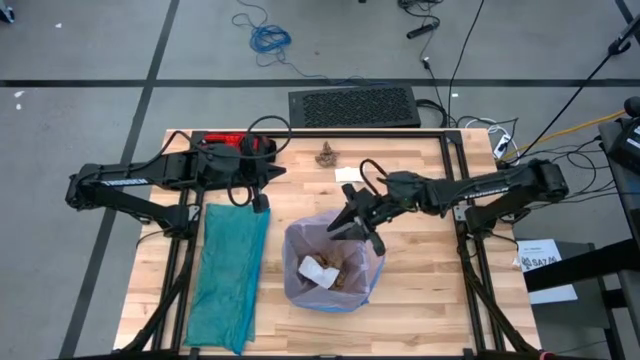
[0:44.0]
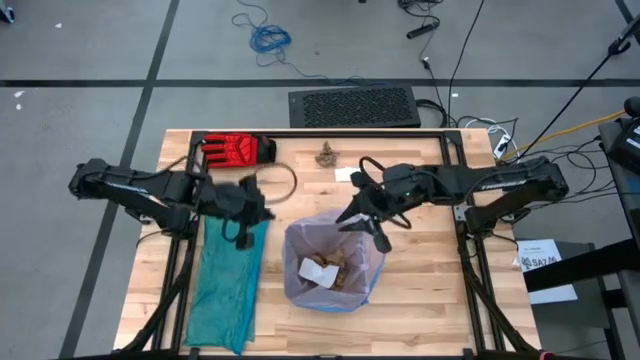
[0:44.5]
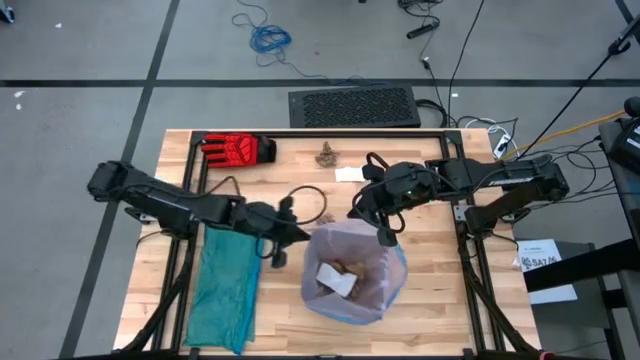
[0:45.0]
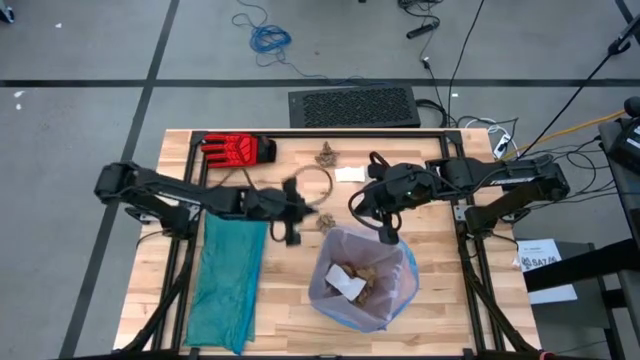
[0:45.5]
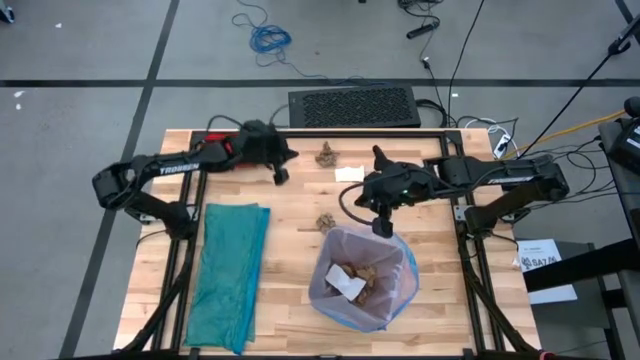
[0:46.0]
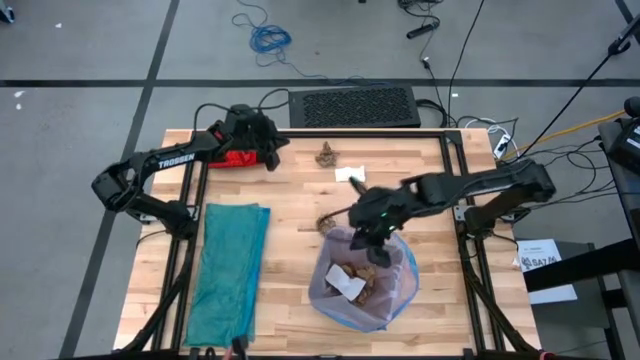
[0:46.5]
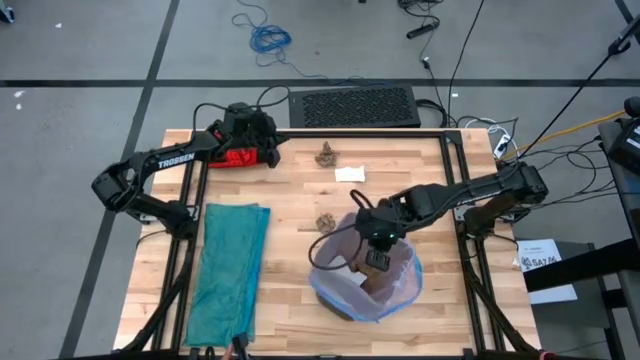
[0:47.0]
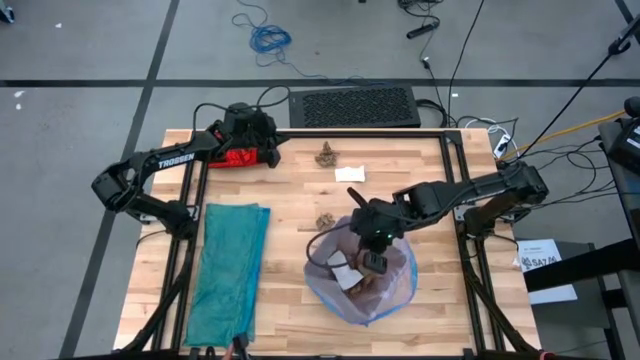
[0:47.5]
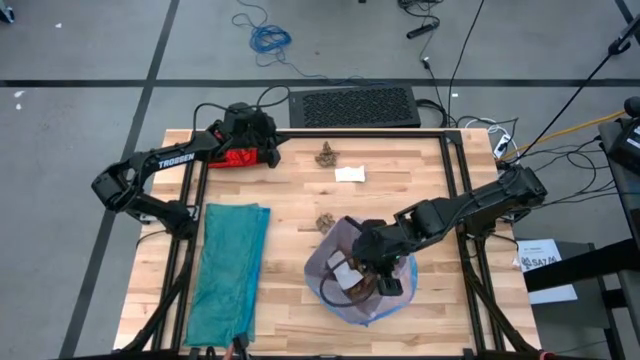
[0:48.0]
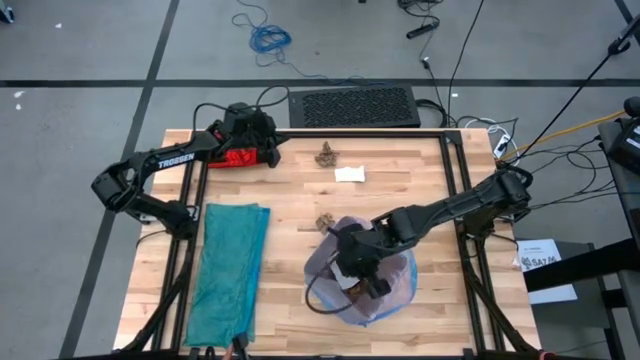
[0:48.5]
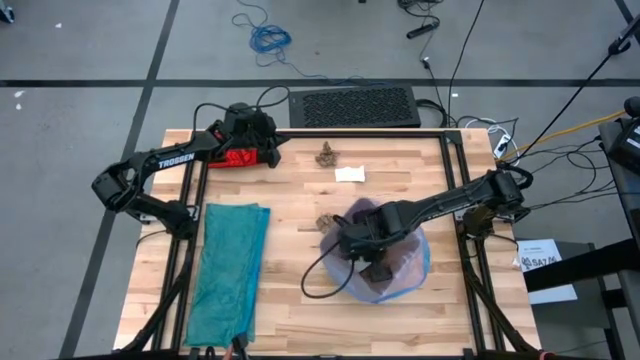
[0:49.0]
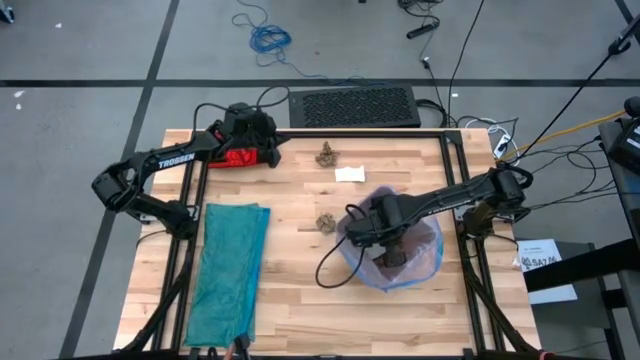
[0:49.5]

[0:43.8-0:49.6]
Task: place trash/remove bag and relplace
Adjust the black trash bin on the table

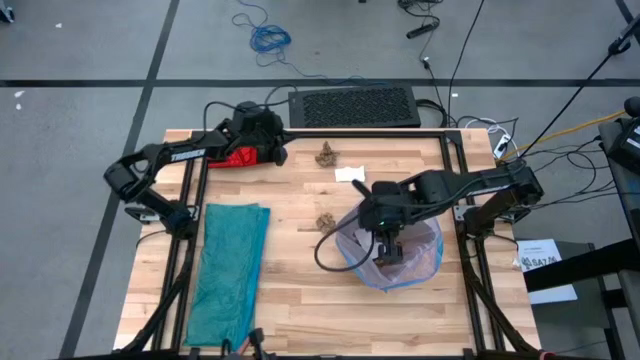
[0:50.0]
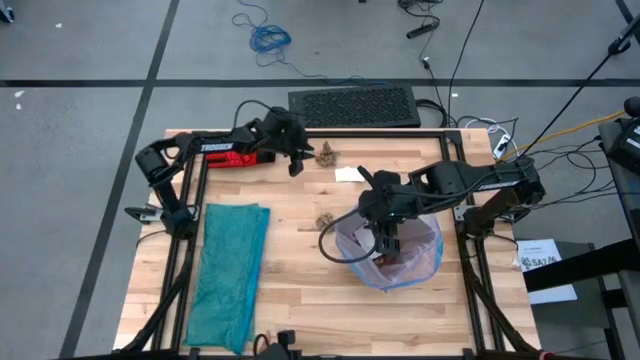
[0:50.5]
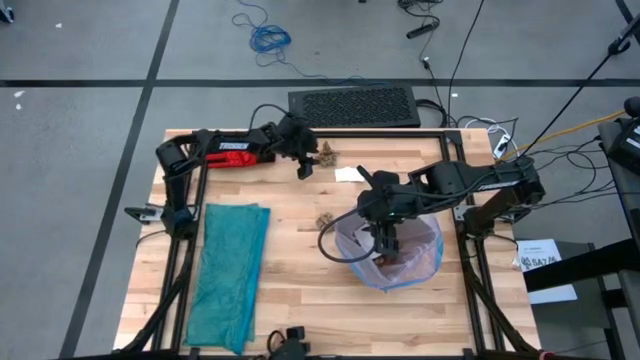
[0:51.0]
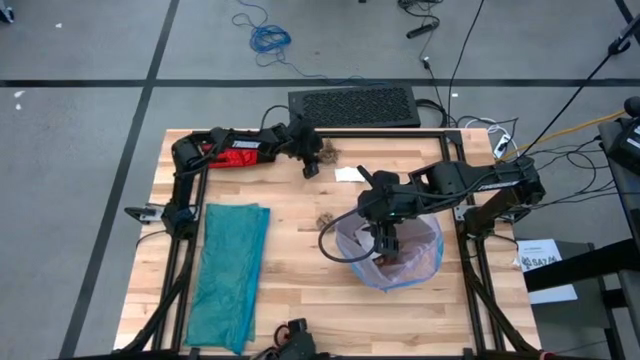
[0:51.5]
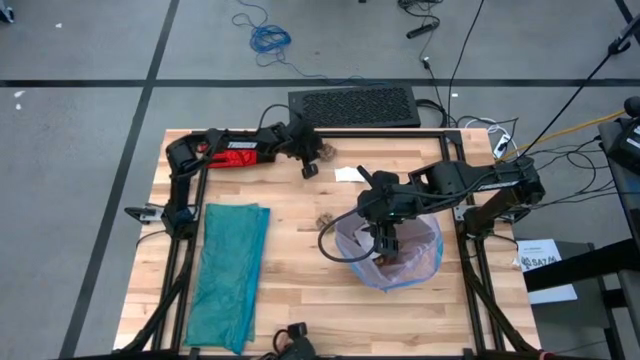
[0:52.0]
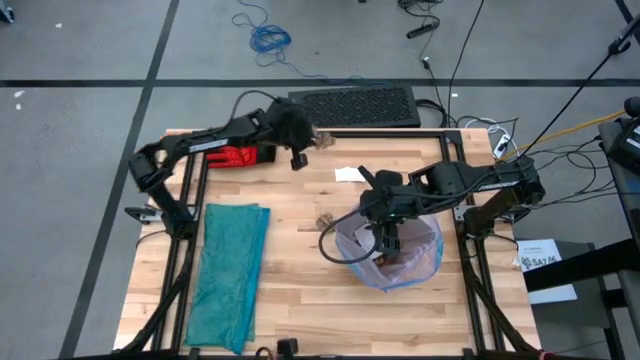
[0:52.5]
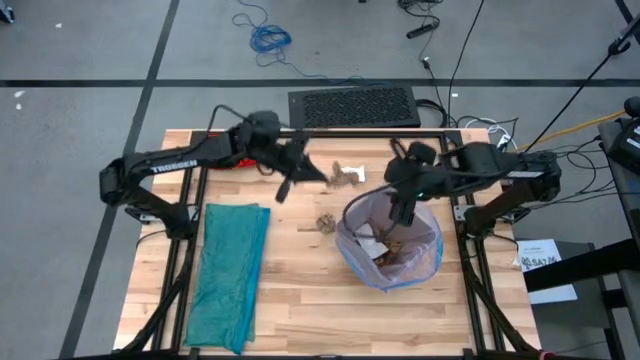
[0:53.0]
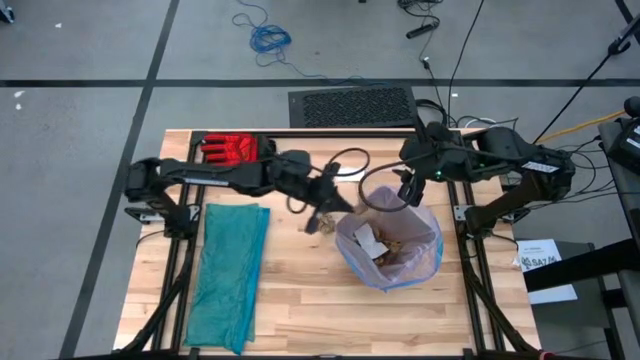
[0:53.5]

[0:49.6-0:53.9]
Put the brown napkin into the black trash bin

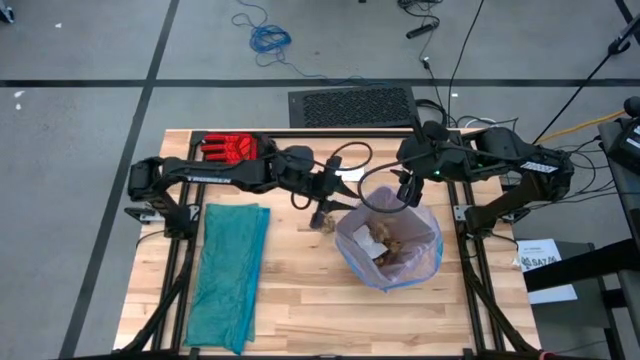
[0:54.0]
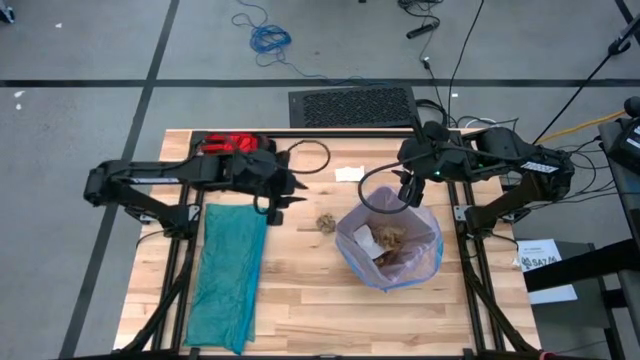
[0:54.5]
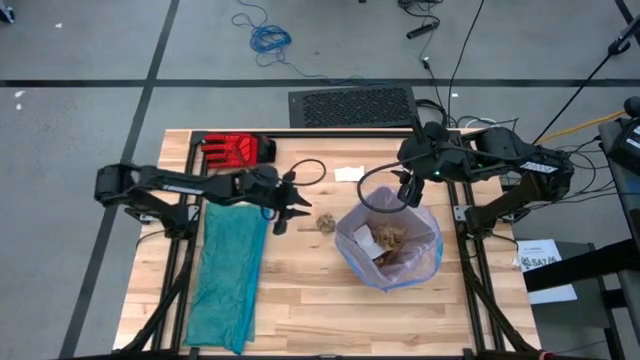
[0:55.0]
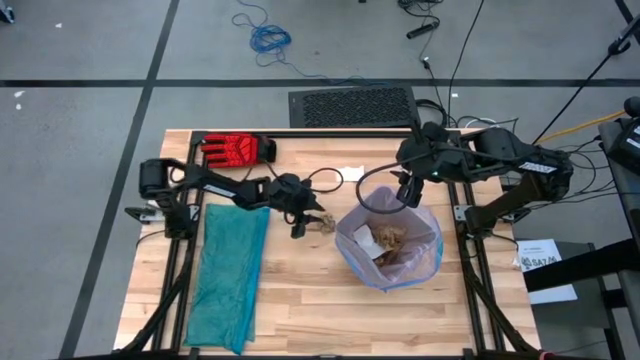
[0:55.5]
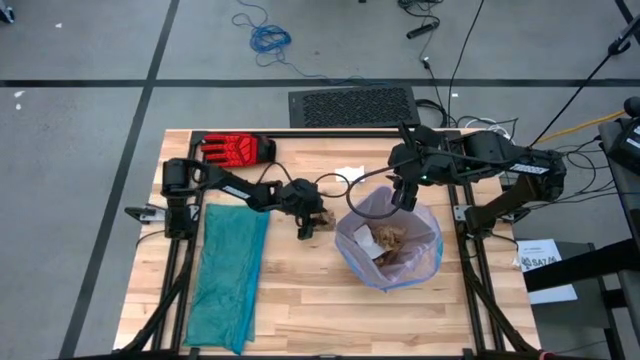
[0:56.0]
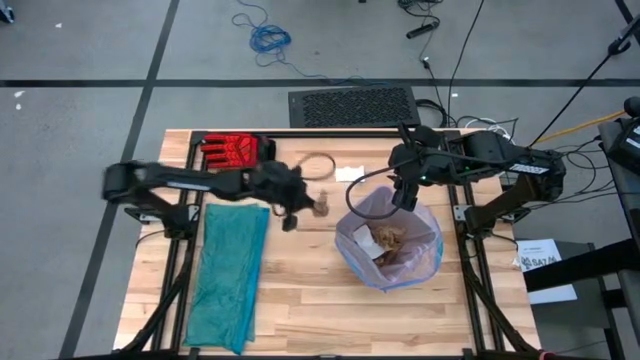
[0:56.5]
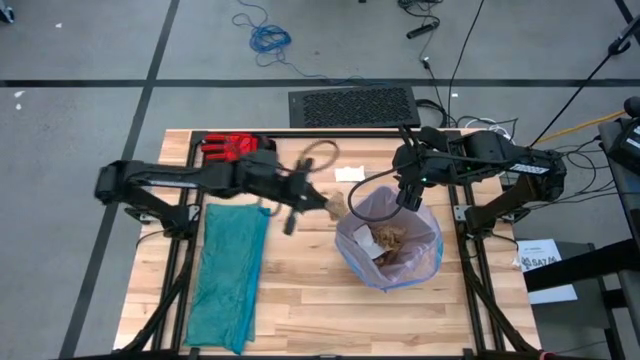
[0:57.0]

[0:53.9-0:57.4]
Put the brown napkin into the black trash bin

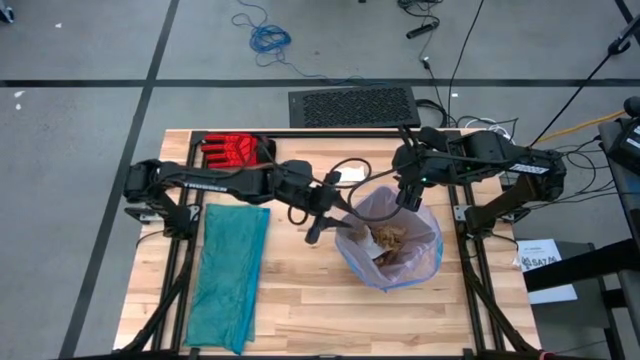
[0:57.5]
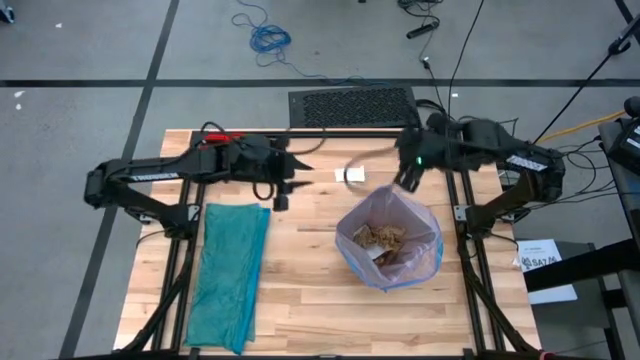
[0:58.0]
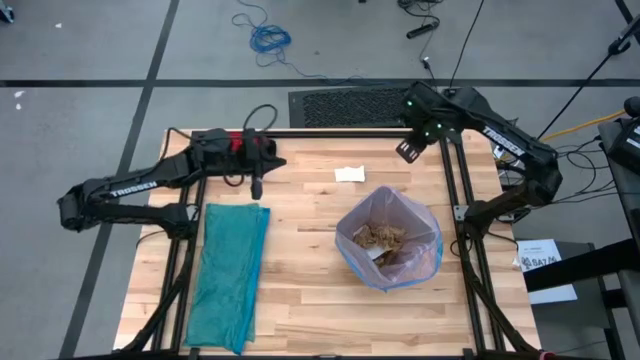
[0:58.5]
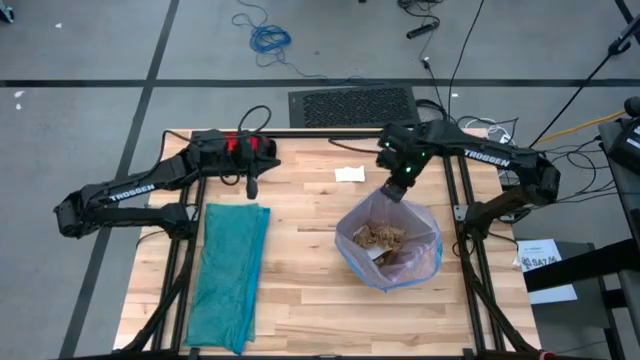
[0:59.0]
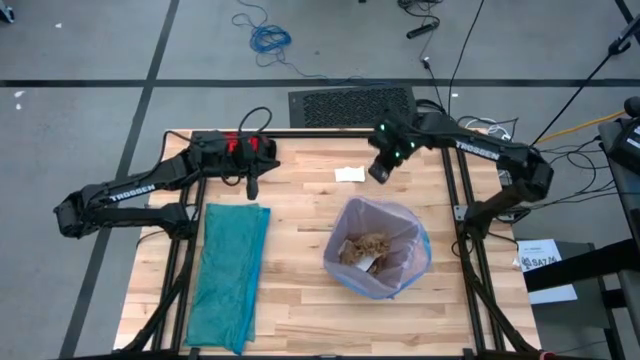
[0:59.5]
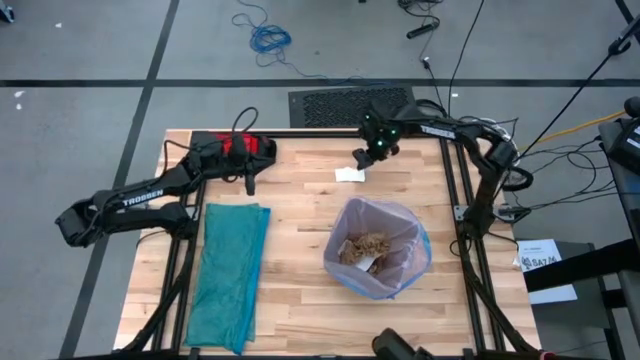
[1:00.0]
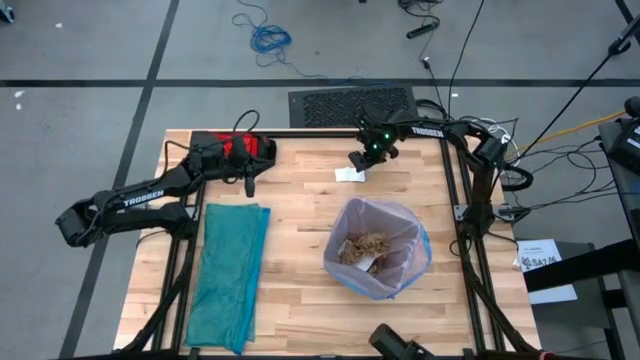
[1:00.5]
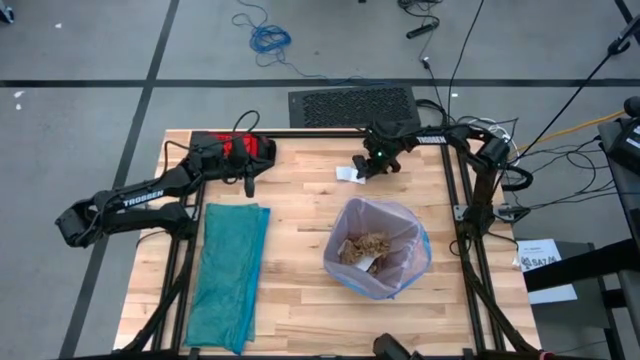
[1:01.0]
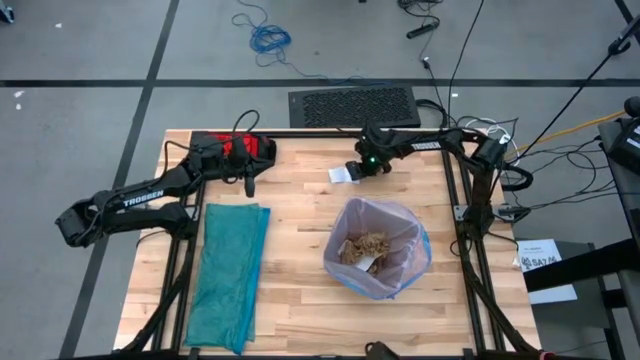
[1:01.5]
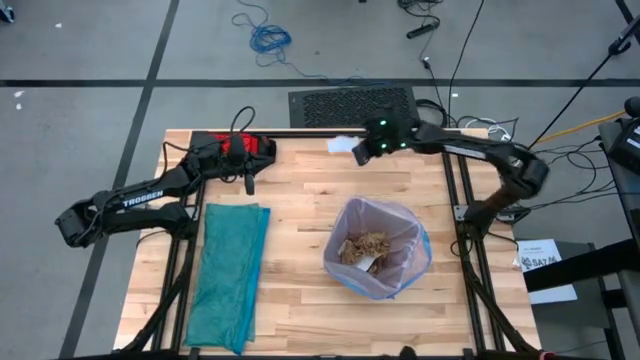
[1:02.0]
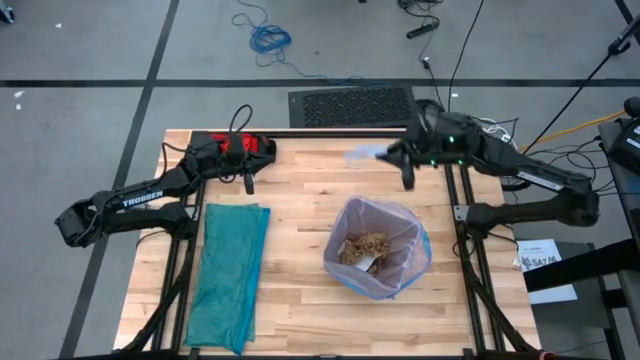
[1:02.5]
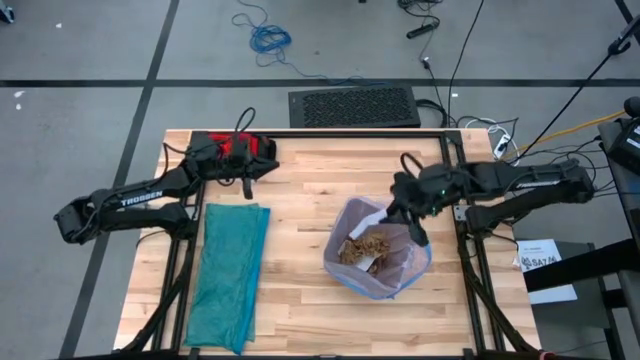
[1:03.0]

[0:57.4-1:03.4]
Put the white paper into the black trash bin

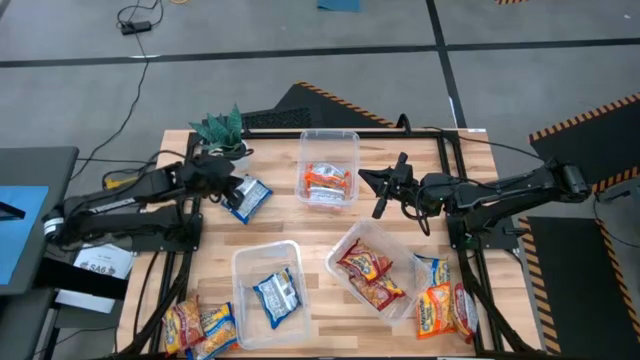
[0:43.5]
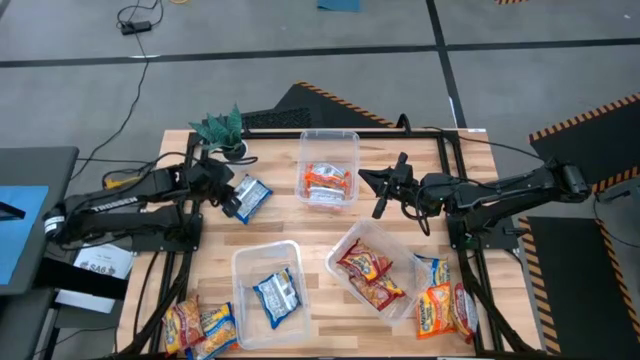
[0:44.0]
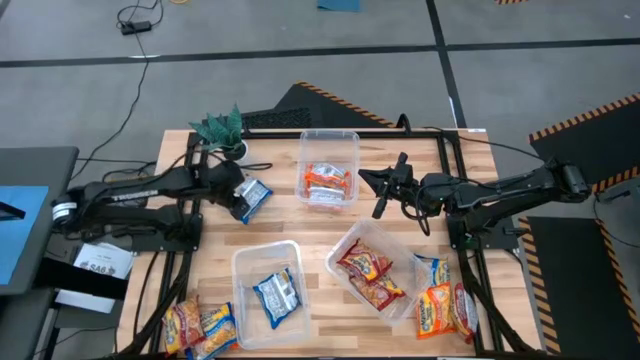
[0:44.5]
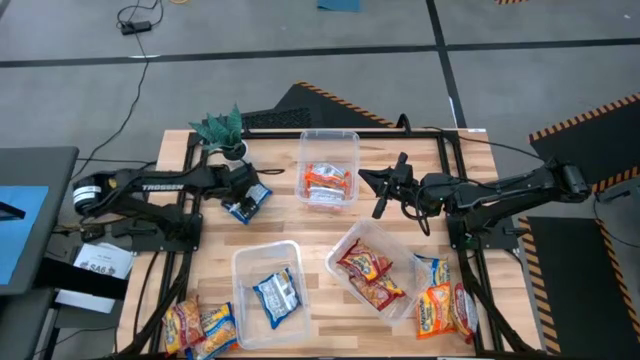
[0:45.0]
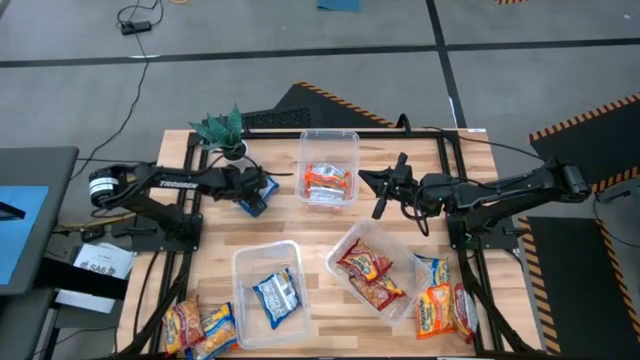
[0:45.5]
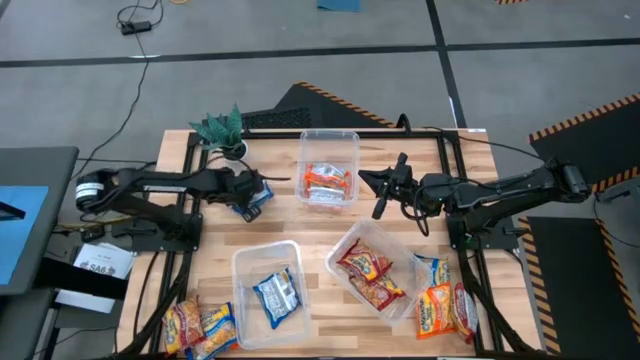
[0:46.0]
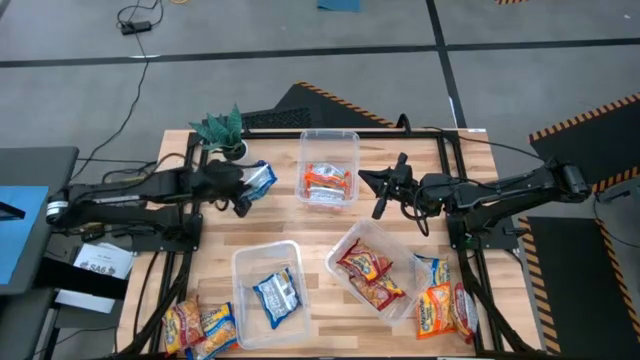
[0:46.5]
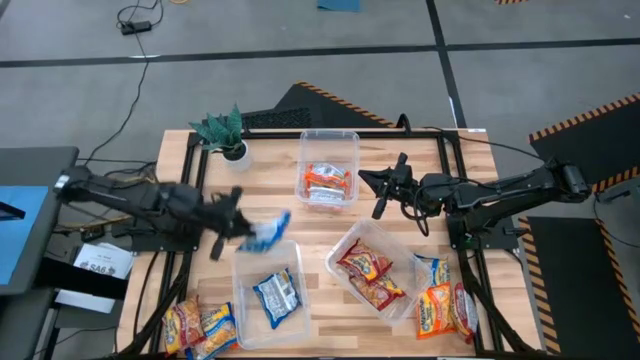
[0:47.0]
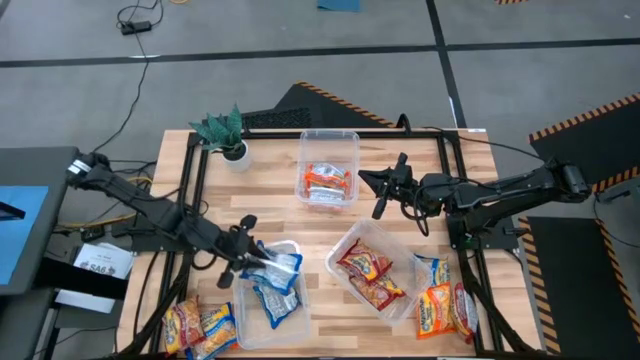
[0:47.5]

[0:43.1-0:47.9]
Task: Sort Maruchan noodles
Put the blue noodle pack into the bottom left transparent bin
